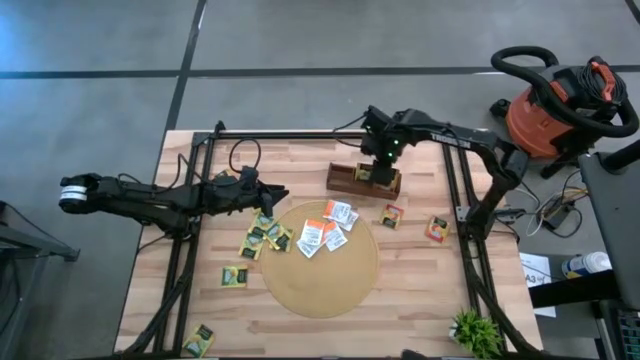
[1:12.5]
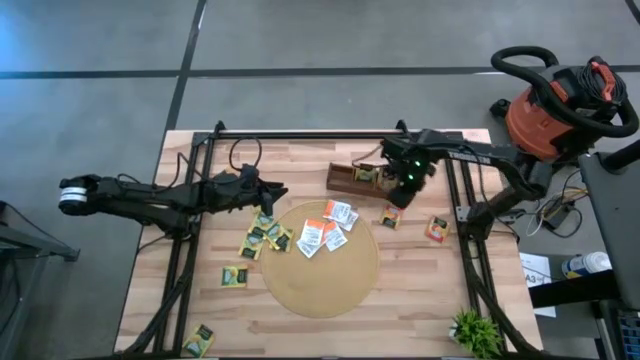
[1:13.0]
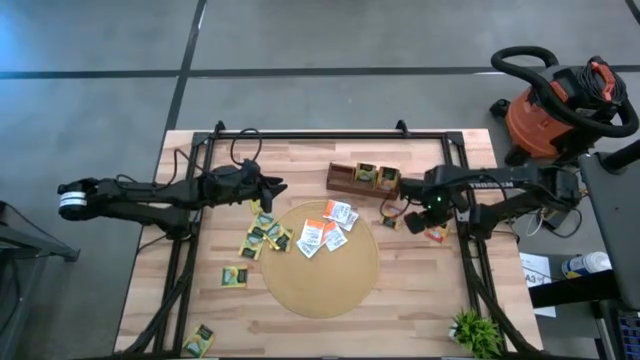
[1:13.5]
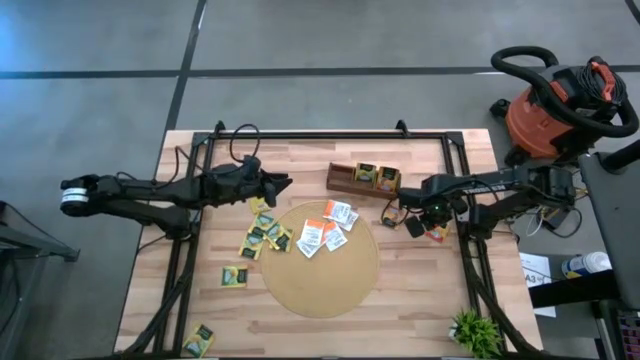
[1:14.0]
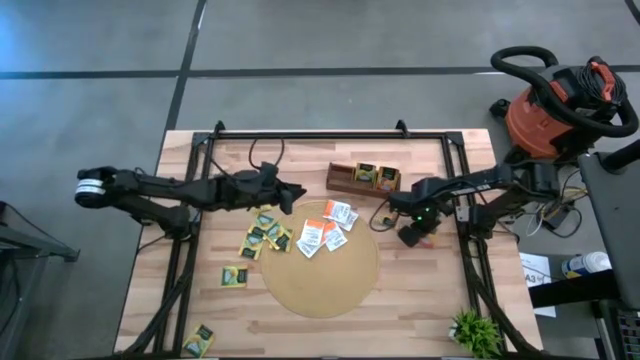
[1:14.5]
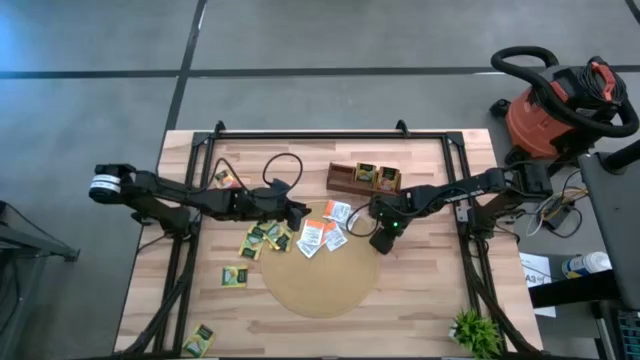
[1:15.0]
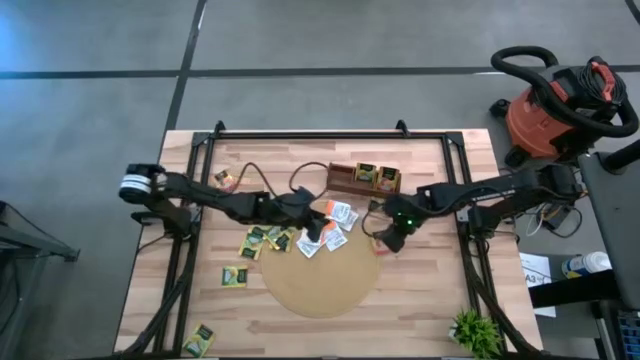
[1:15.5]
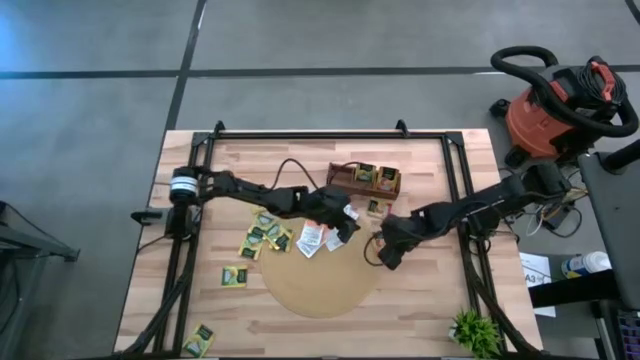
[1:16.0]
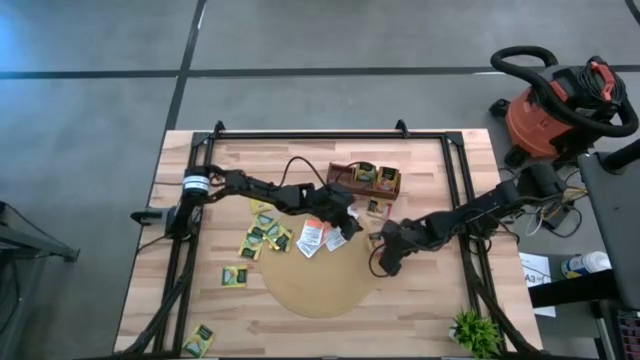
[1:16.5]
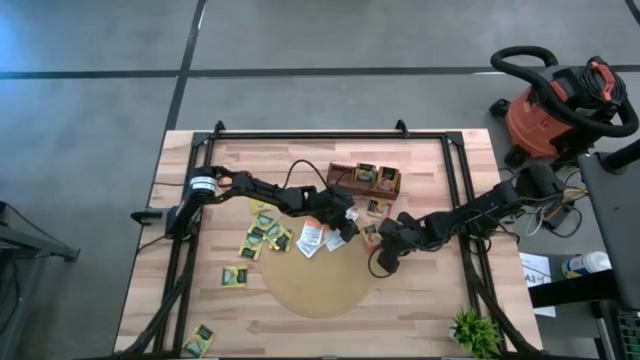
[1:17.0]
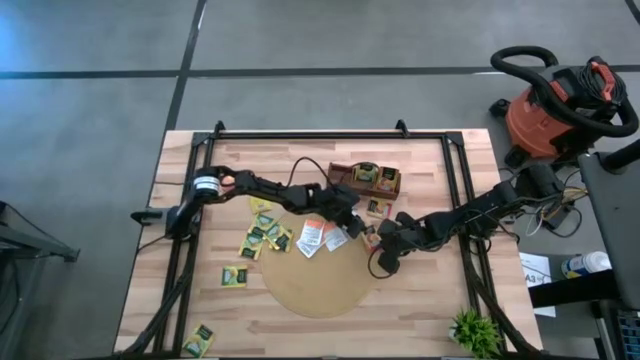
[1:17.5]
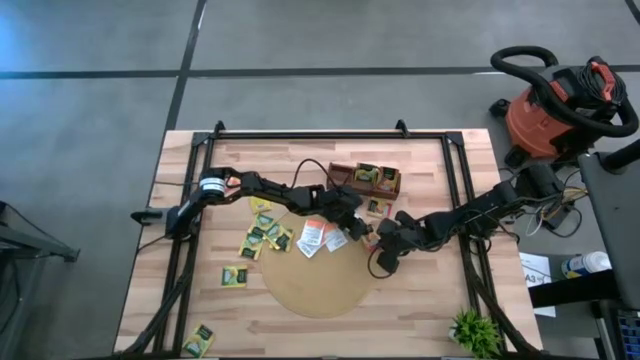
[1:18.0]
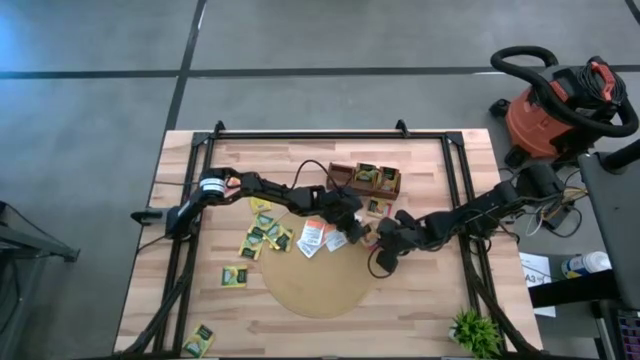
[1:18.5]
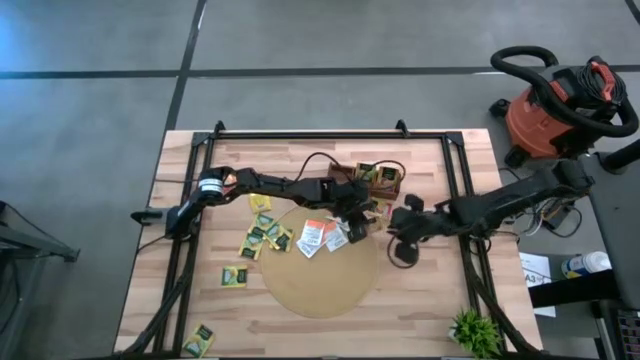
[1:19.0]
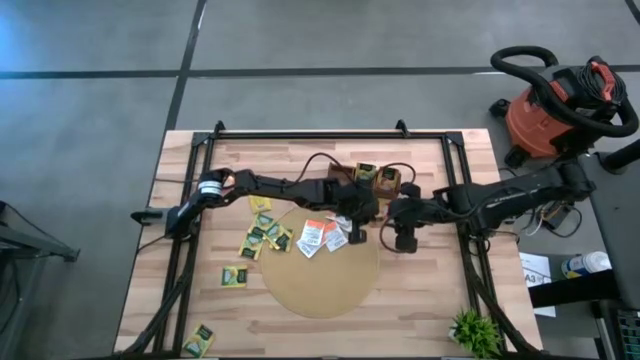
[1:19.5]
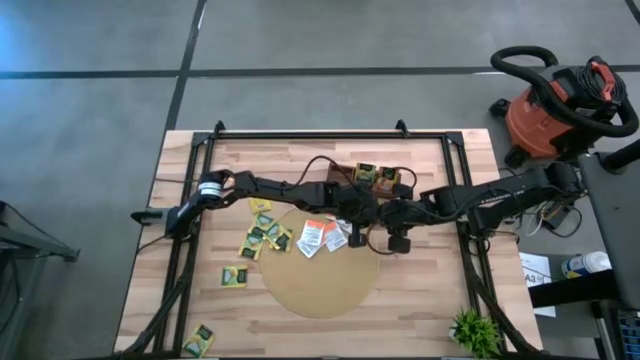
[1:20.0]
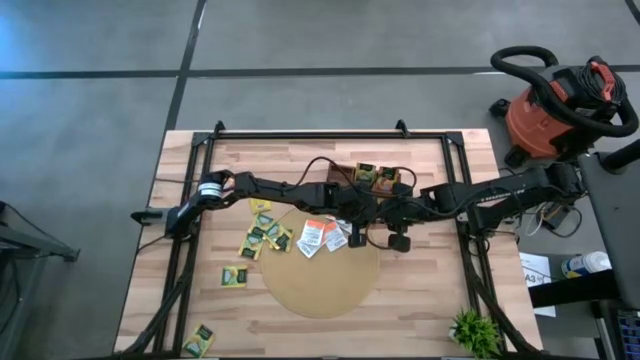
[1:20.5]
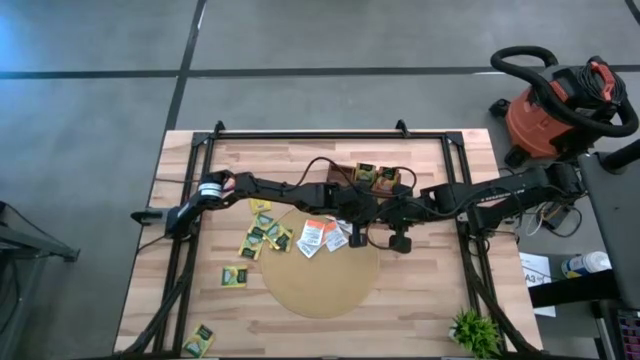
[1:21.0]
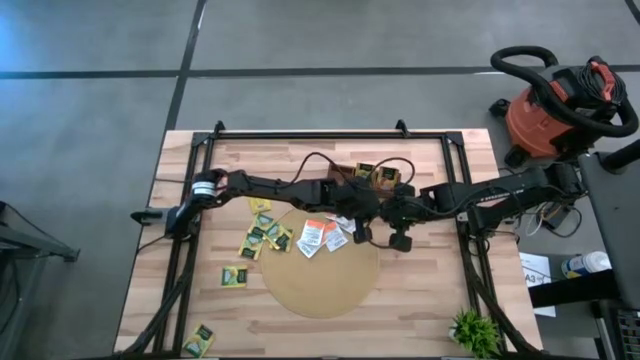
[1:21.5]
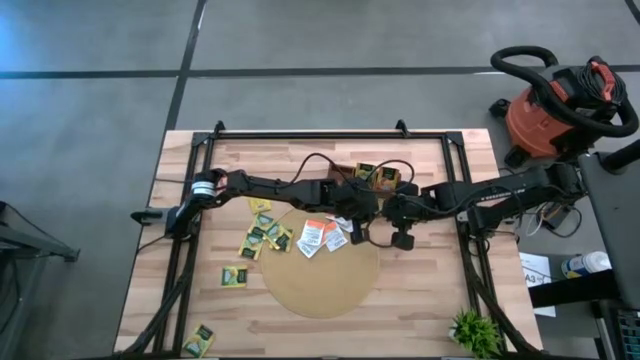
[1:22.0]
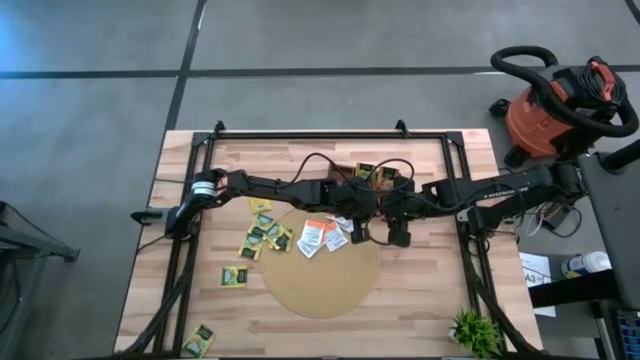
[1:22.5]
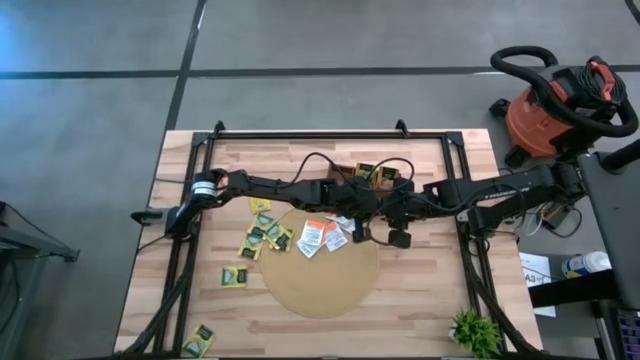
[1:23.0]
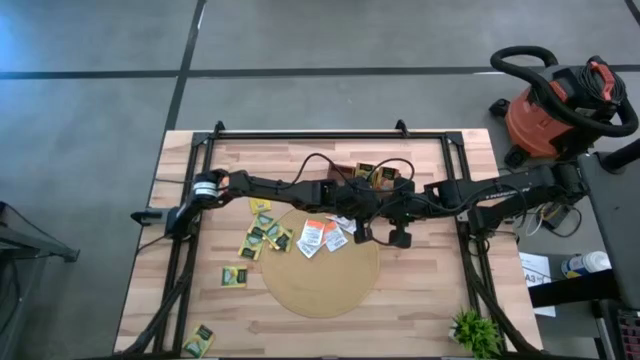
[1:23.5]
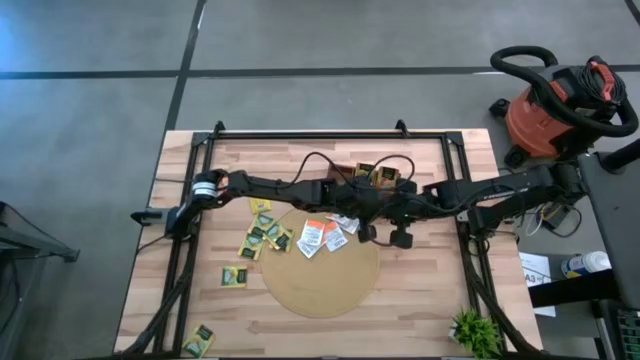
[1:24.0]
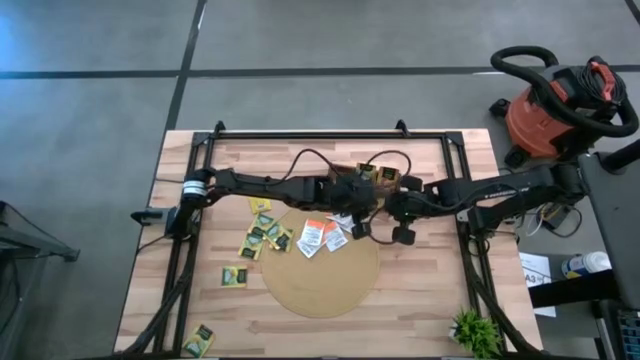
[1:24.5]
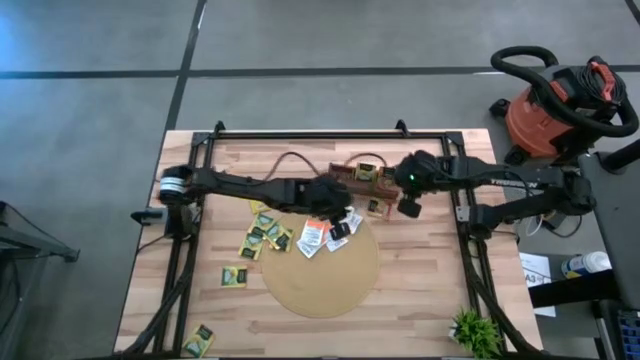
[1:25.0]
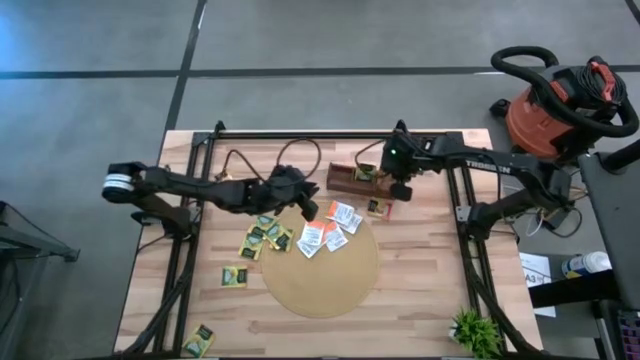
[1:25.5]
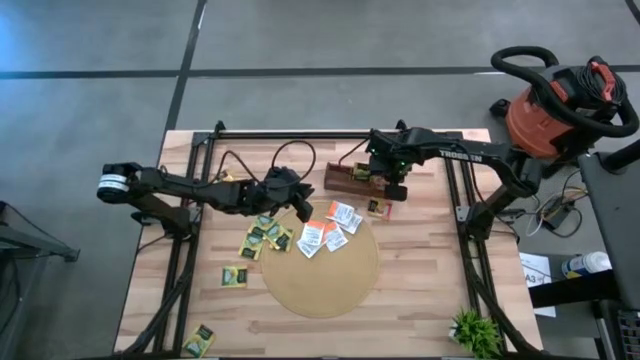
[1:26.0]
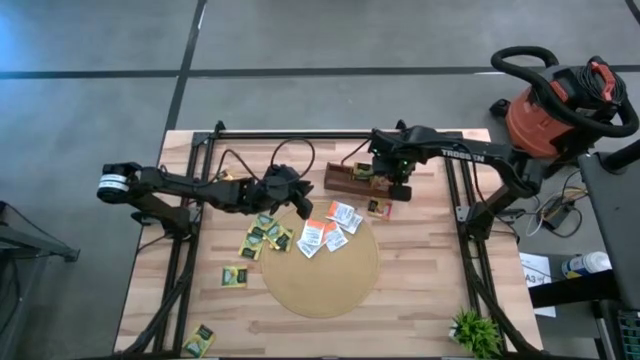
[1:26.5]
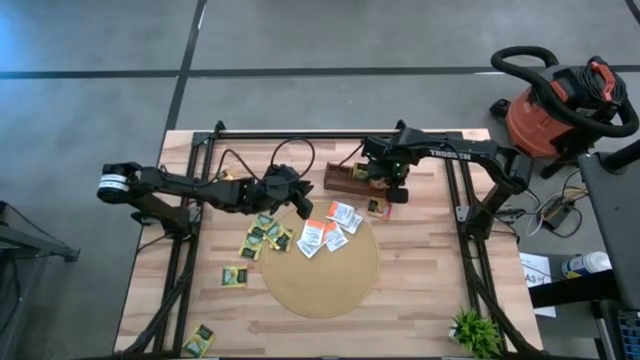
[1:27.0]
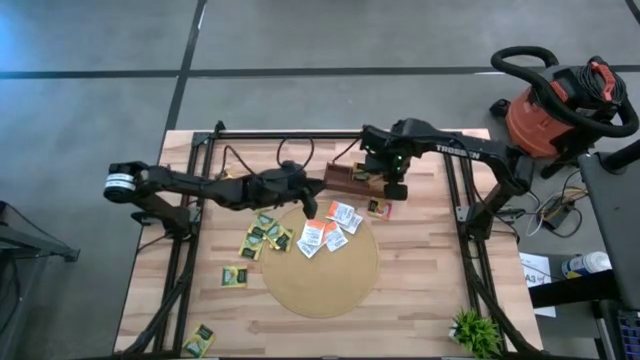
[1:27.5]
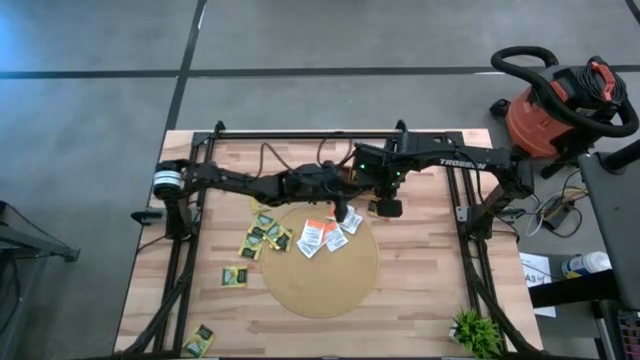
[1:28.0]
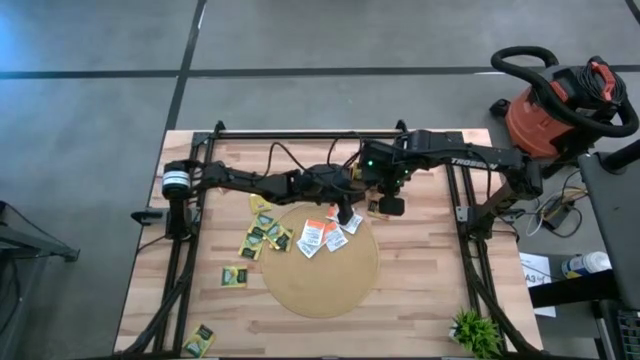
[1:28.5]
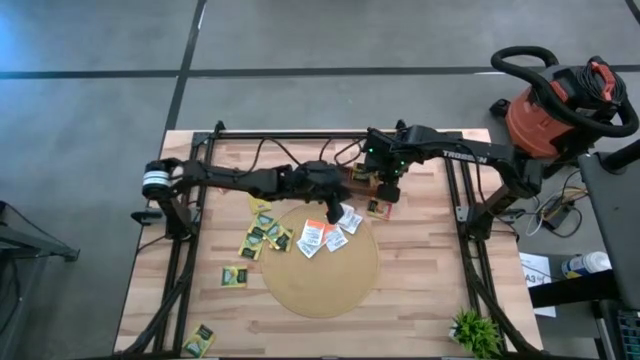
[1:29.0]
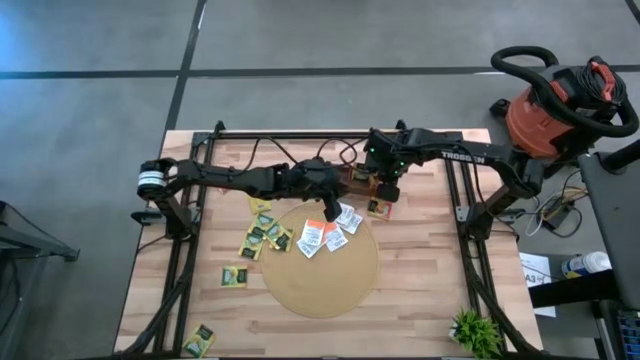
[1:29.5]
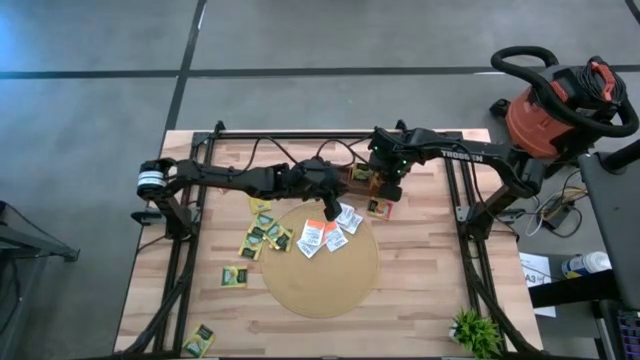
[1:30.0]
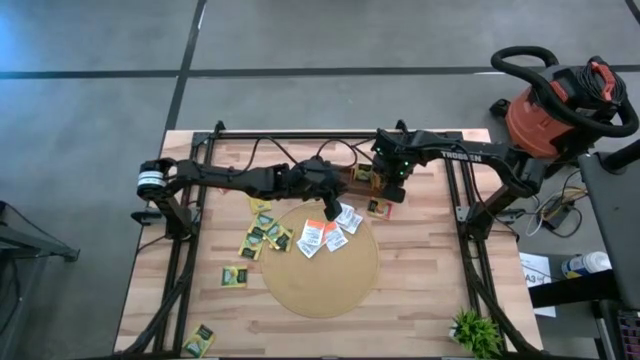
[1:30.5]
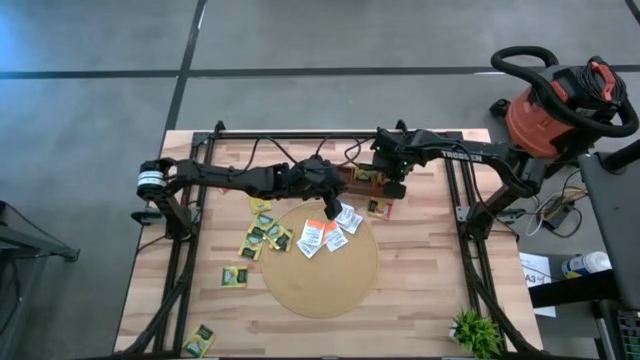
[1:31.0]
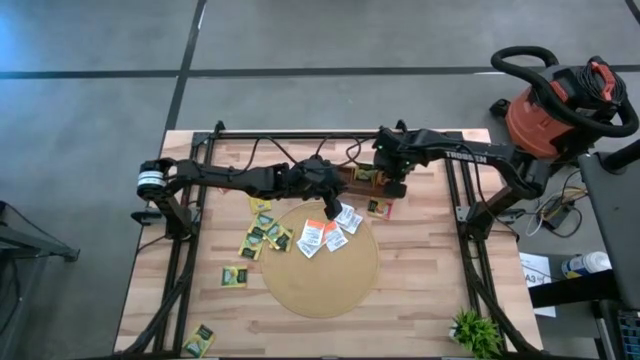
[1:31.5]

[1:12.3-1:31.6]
Task: Pick & Place Tea
Put the mango tea bag into the right section of the wooden organizer
